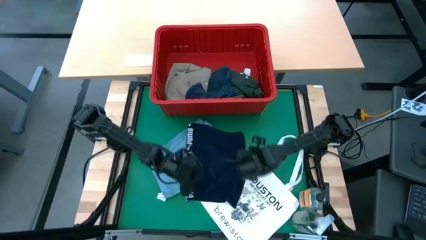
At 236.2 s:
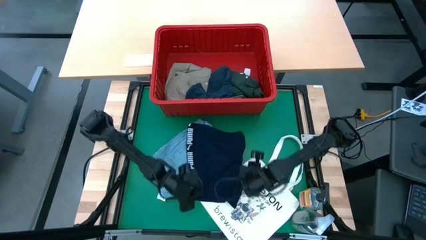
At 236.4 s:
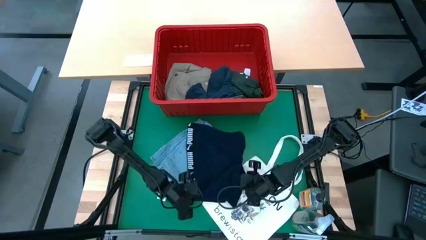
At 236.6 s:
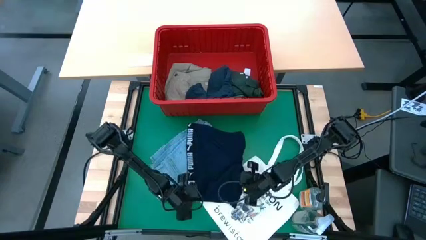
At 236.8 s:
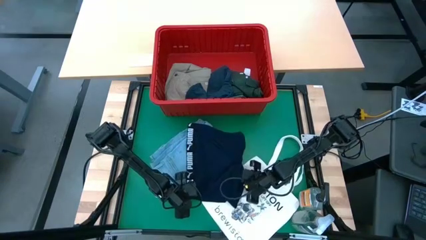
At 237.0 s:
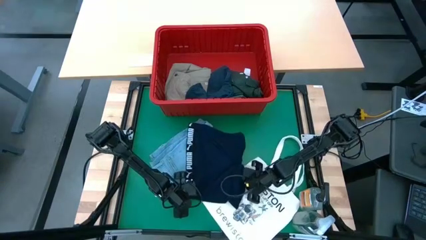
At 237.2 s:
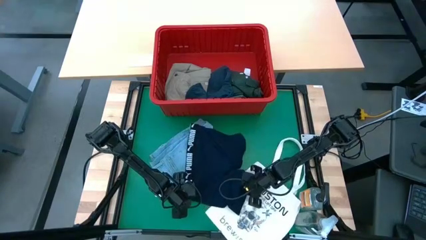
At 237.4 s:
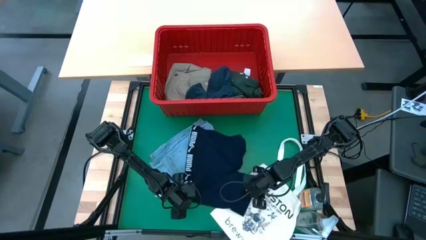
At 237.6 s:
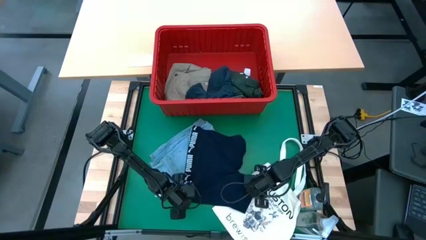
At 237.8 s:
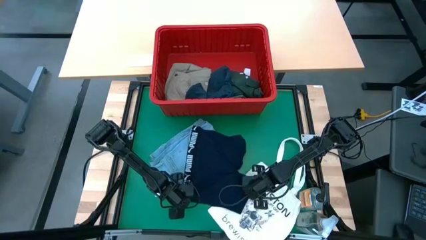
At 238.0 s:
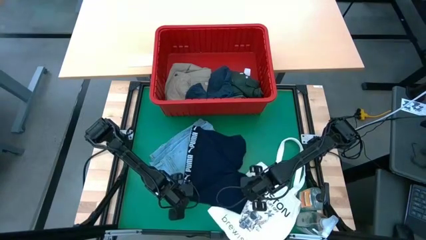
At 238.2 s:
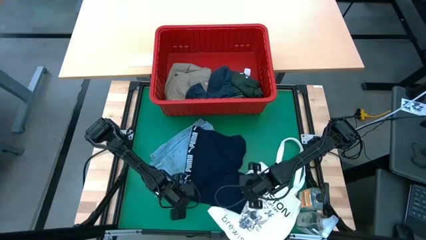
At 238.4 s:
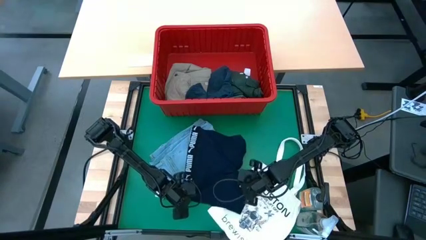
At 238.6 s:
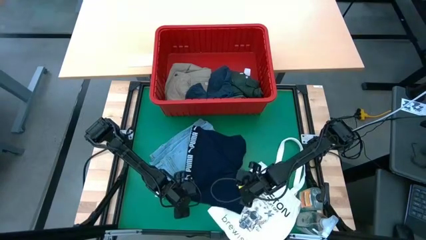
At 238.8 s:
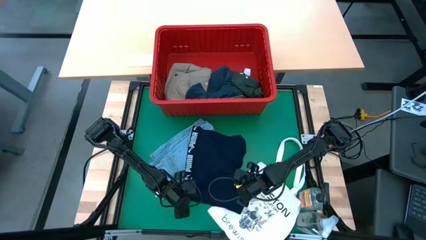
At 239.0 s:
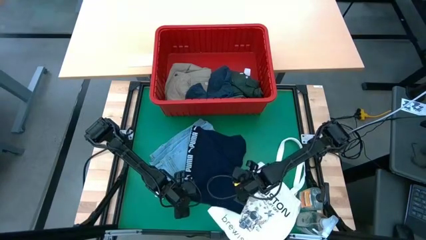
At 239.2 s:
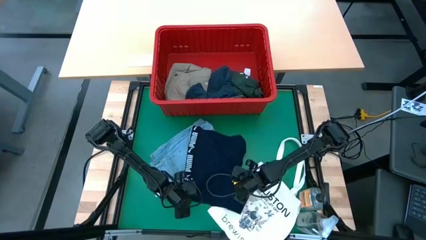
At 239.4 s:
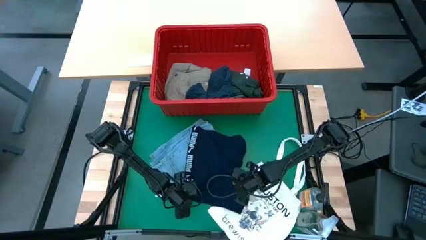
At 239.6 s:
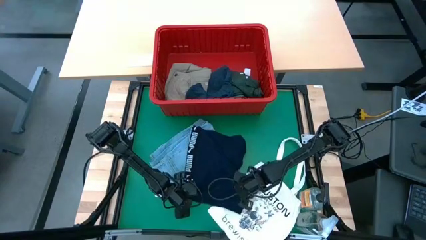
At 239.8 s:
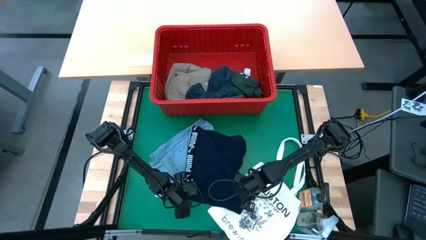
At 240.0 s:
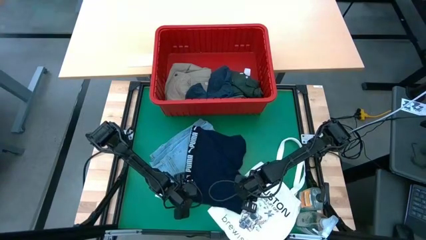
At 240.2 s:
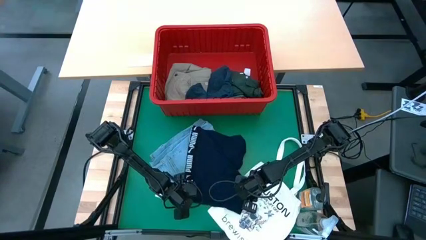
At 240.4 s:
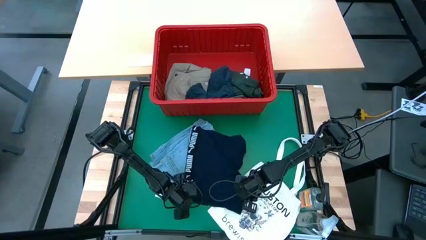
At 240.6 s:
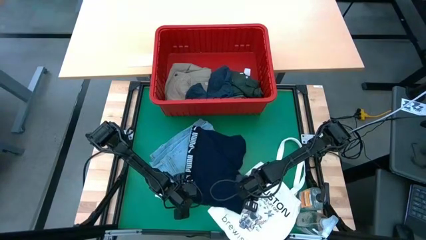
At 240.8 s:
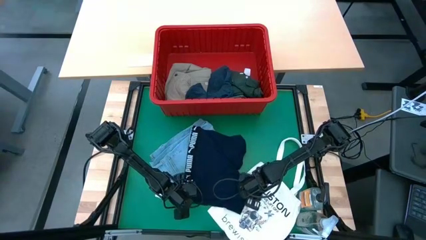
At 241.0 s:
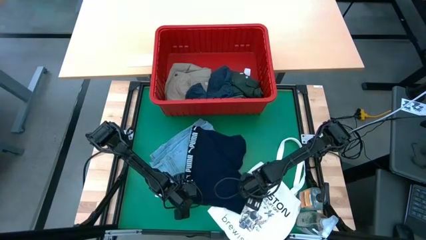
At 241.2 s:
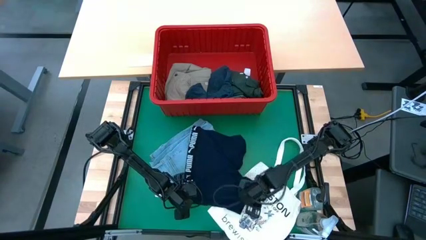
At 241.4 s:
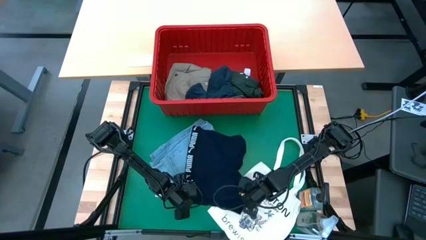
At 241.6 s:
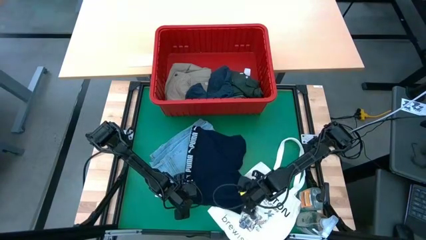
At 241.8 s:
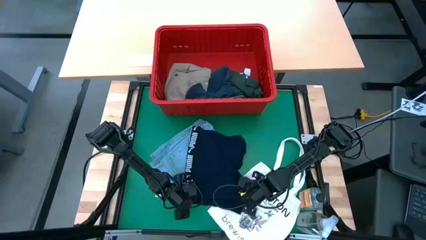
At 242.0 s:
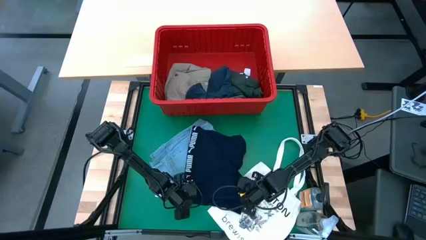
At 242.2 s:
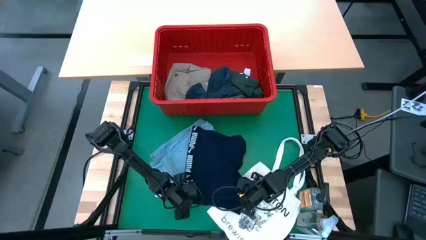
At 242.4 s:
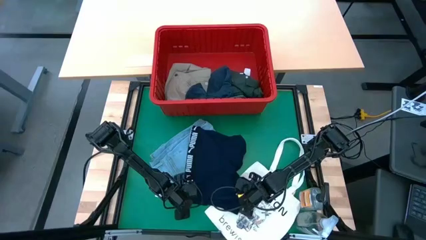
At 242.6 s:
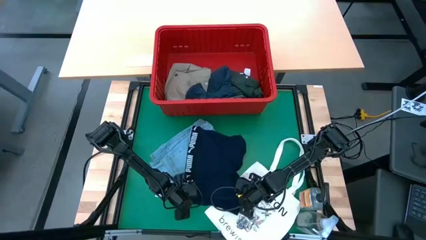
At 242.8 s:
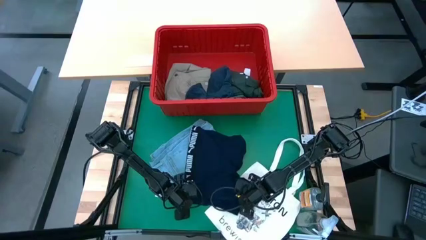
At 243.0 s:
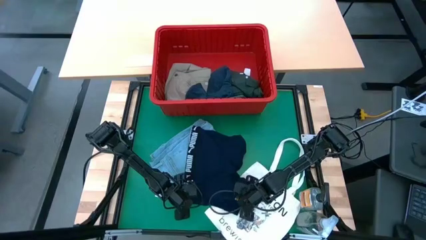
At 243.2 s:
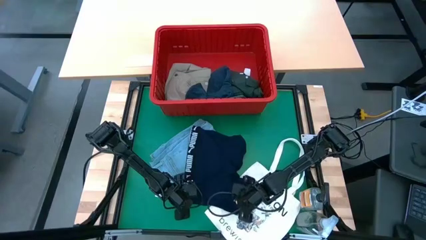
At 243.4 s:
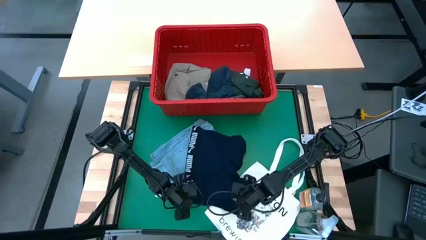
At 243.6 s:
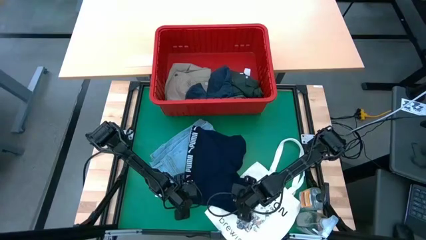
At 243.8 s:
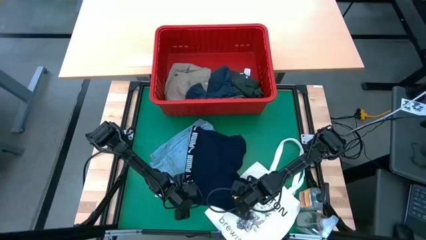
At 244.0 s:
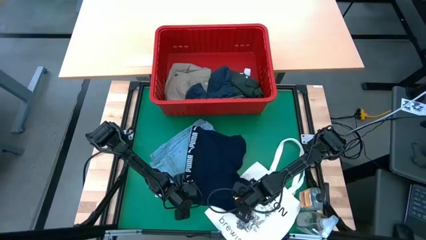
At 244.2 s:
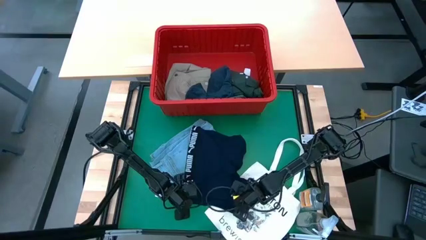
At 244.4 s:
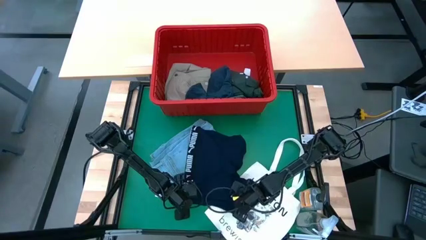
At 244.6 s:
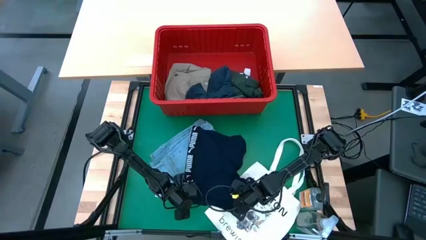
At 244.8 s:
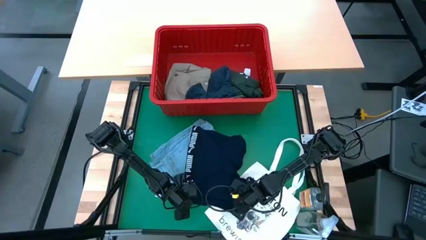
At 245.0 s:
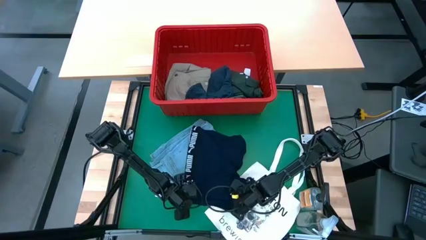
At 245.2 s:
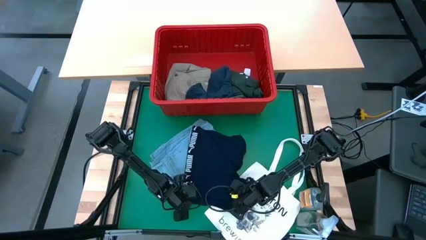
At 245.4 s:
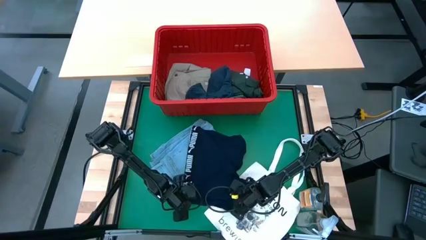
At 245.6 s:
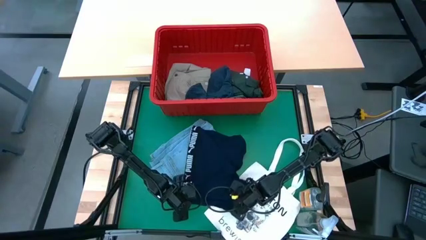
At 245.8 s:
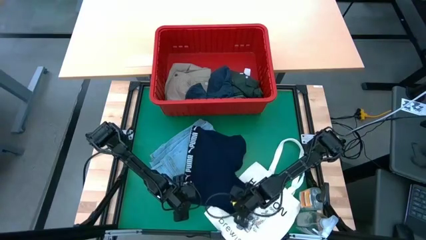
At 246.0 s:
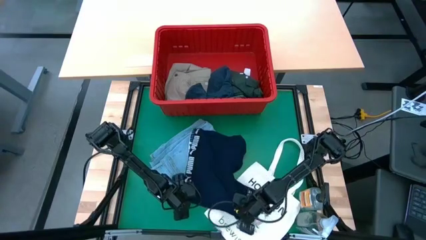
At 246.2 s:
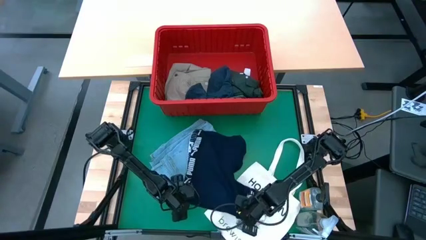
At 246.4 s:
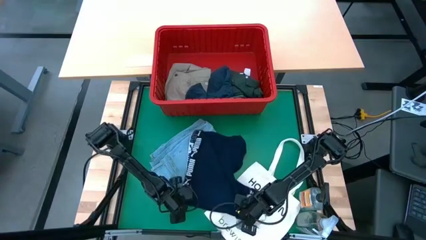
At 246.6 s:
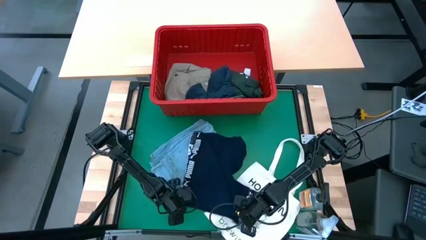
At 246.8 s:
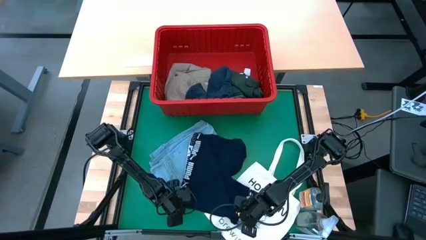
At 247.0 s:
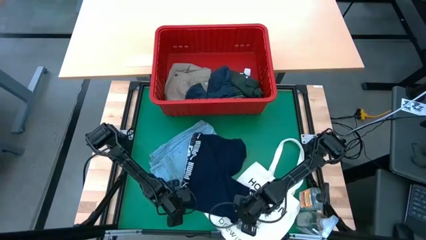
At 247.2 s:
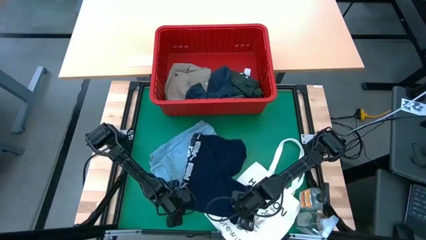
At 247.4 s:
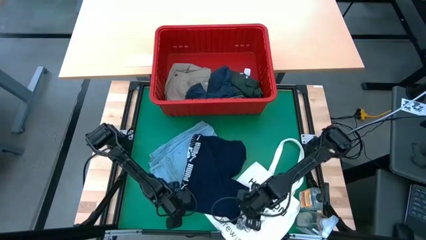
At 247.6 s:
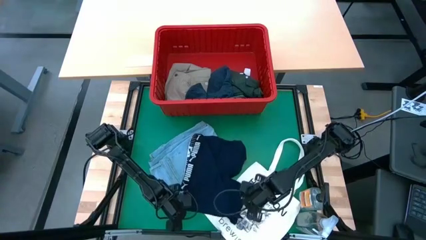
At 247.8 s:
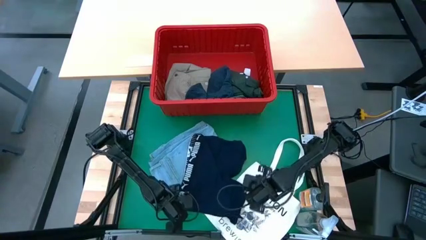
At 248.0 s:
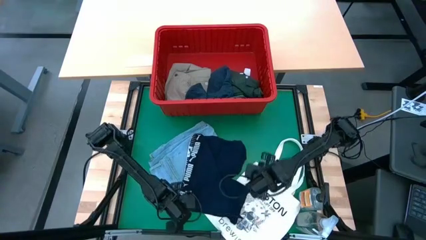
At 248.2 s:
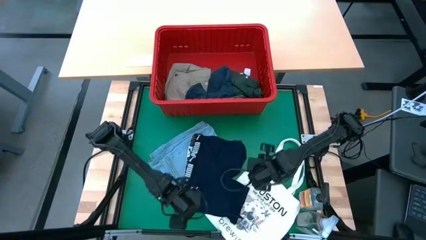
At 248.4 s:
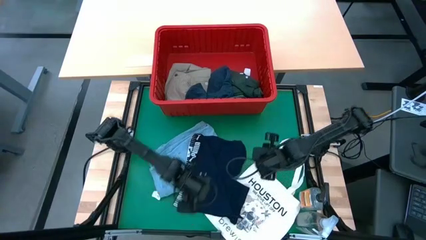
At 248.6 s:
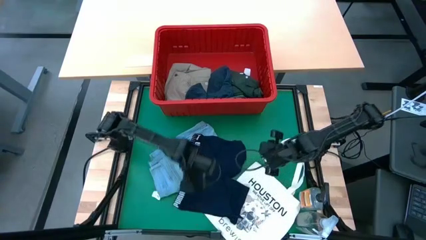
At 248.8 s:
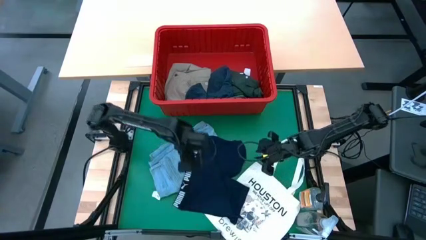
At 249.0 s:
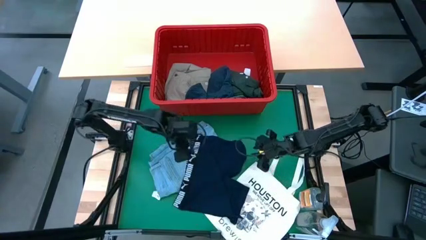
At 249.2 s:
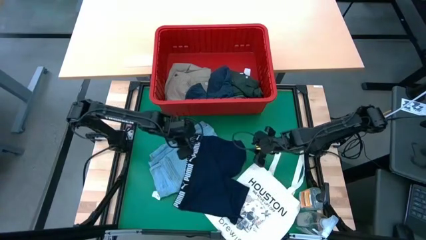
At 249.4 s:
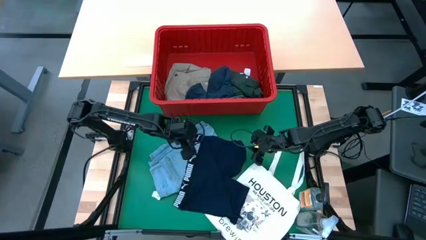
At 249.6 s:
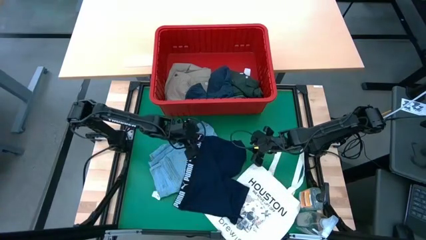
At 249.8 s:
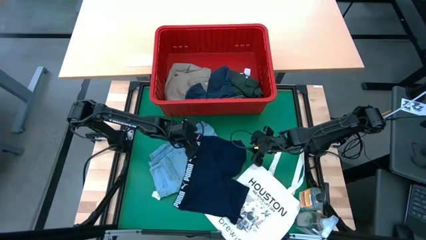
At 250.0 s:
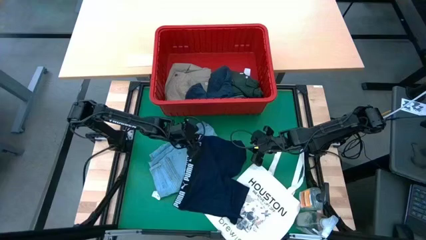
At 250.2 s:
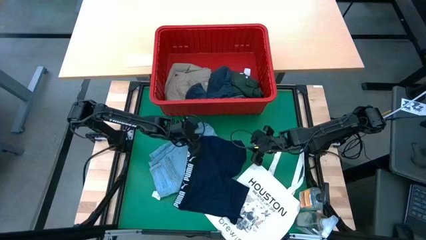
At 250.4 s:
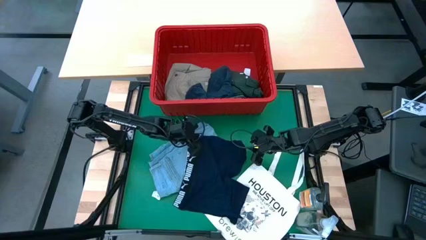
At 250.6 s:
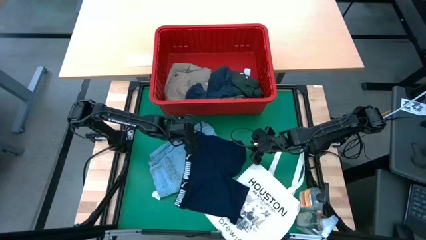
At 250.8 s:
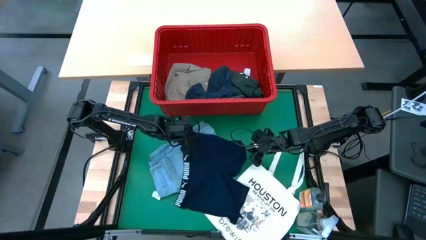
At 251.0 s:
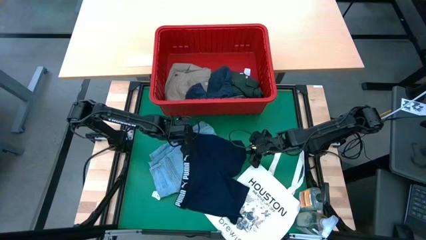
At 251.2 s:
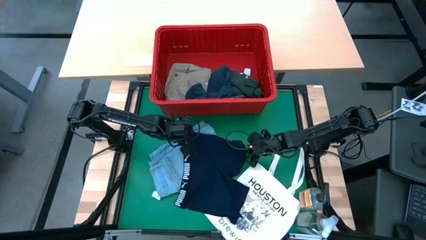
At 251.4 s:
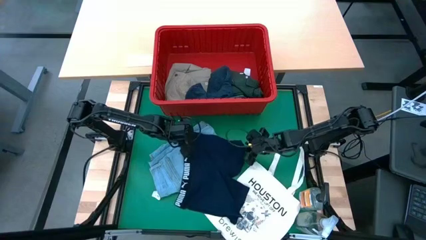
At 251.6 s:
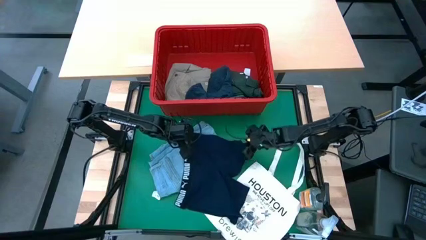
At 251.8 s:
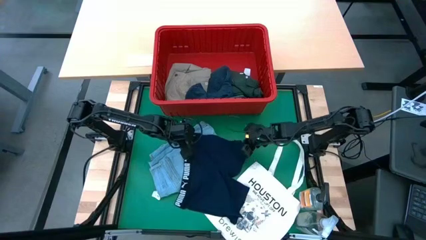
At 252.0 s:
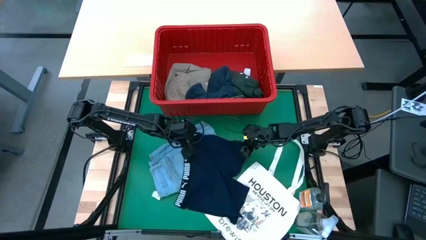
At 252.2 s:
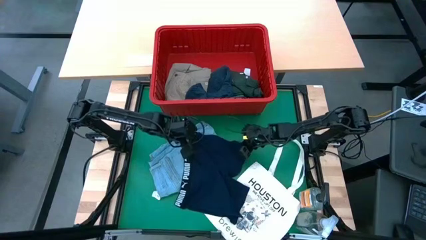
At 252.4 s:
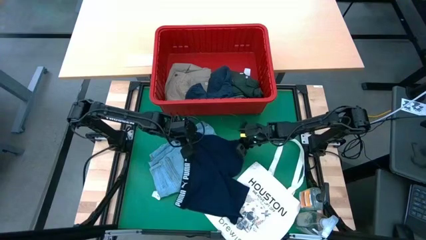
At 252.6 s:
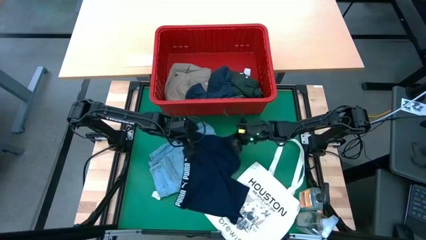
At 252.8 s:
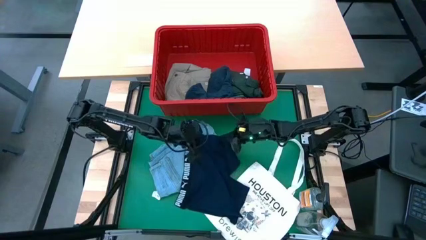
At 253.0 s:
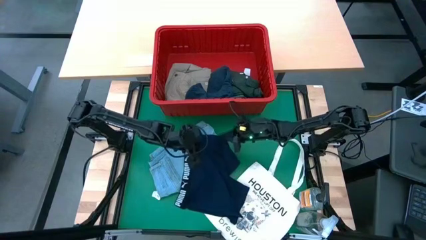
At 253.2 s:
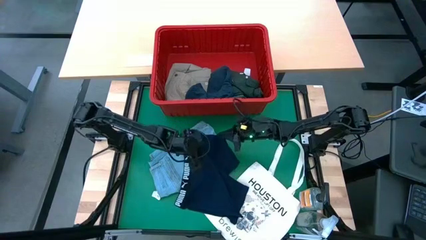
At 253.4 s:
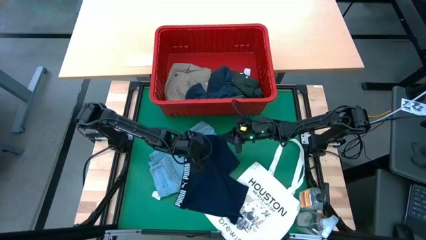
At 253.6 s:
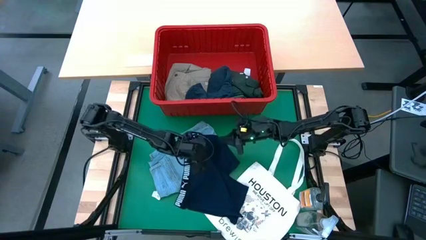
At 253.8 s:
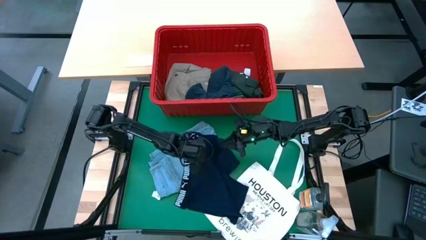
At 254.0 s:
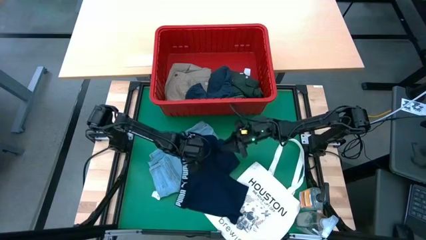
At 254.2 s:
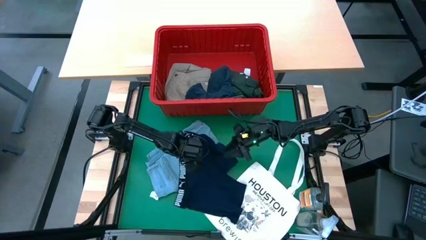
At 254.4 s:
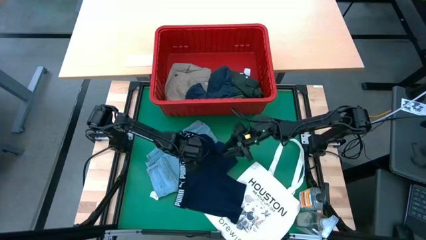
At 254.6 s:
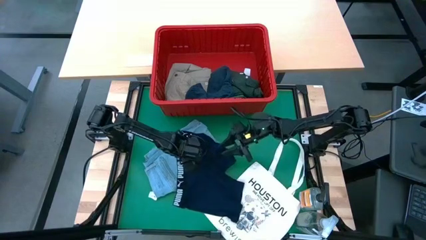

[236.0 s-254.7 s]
Task: Fold Laundry from Bin
Fold the dark blue boxer shorts
